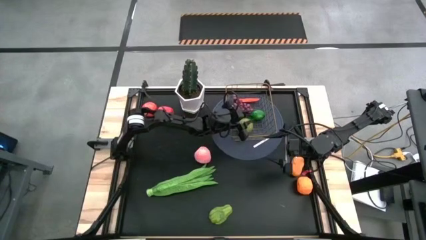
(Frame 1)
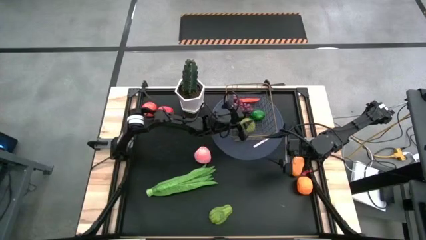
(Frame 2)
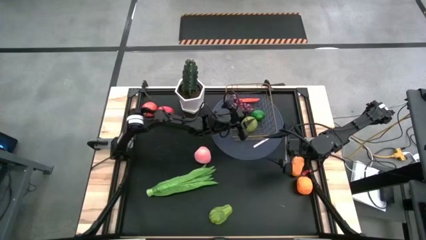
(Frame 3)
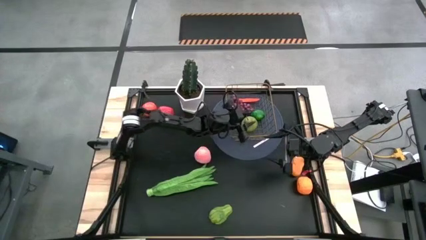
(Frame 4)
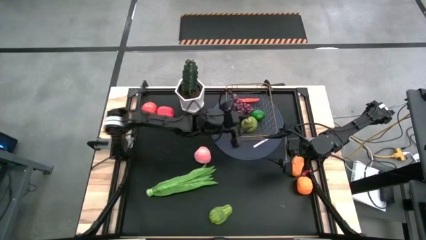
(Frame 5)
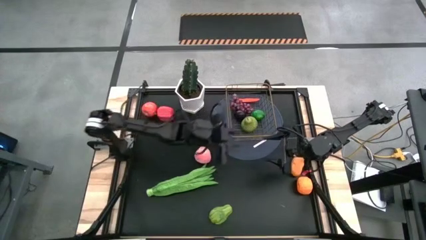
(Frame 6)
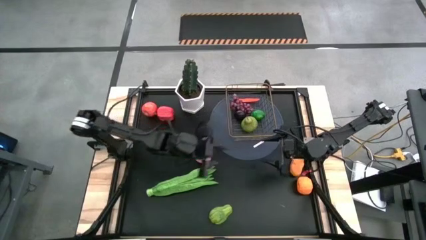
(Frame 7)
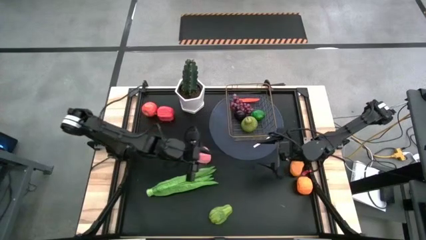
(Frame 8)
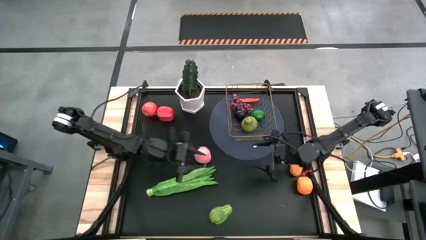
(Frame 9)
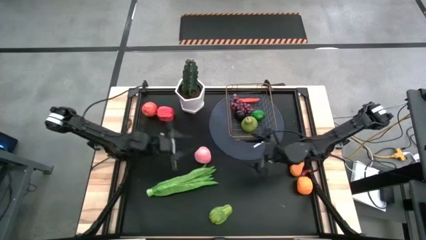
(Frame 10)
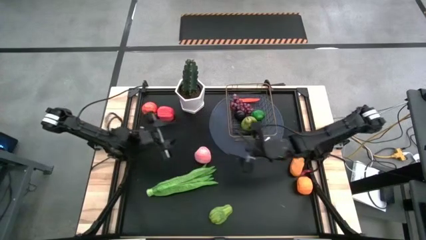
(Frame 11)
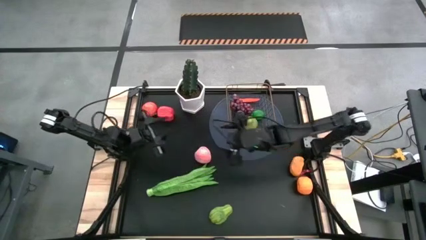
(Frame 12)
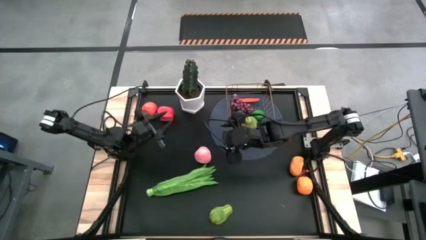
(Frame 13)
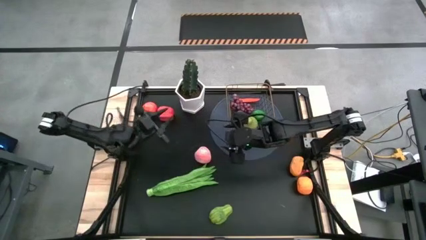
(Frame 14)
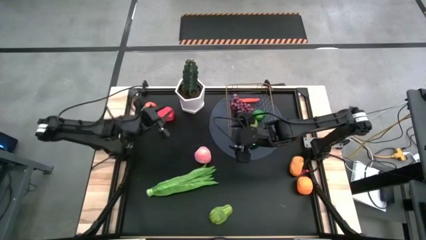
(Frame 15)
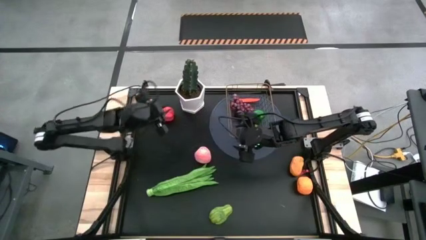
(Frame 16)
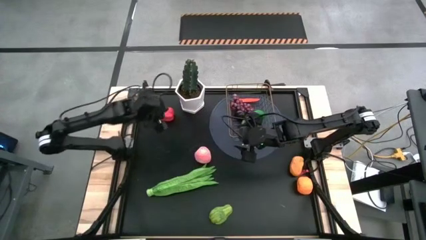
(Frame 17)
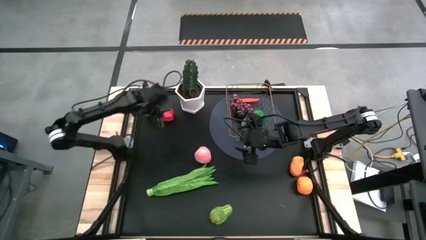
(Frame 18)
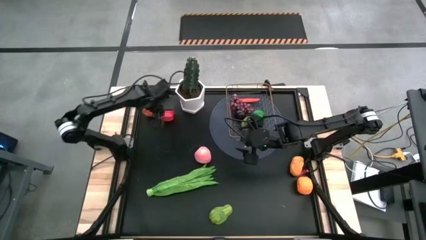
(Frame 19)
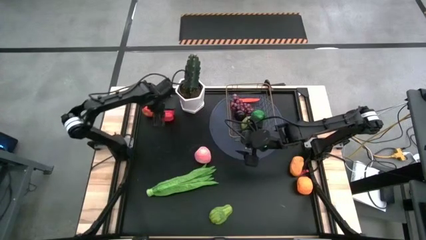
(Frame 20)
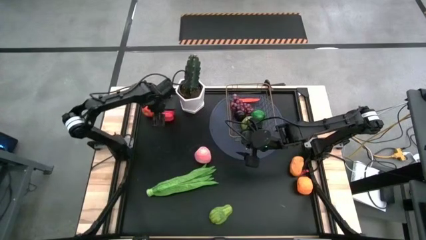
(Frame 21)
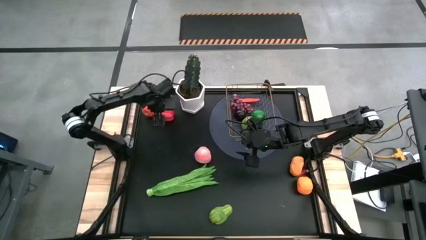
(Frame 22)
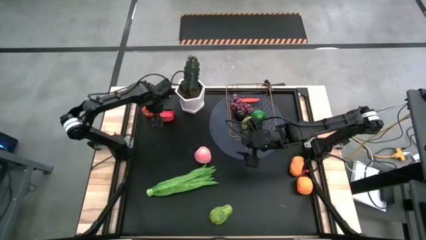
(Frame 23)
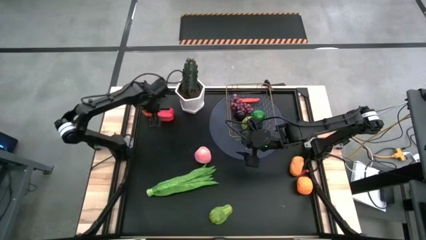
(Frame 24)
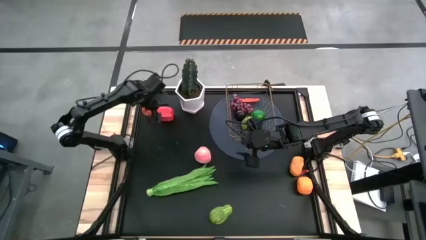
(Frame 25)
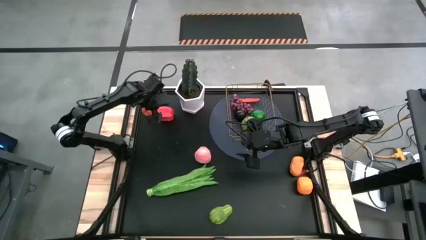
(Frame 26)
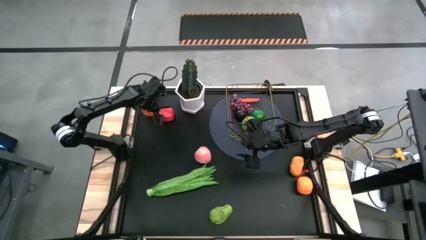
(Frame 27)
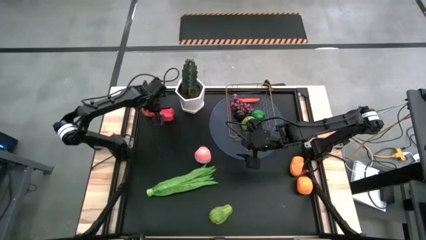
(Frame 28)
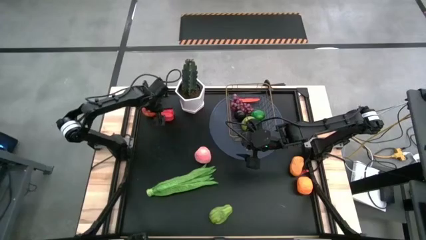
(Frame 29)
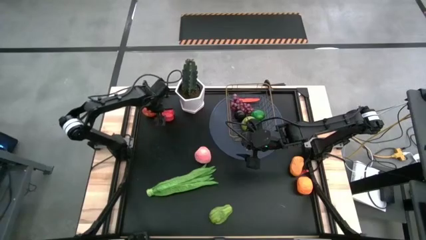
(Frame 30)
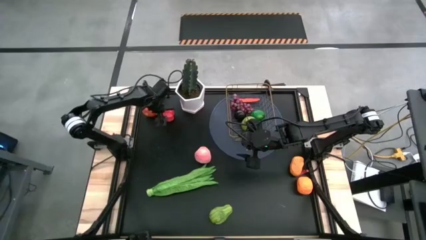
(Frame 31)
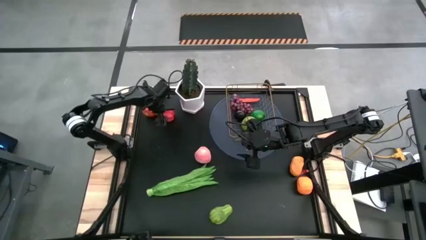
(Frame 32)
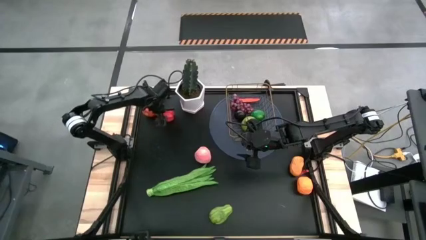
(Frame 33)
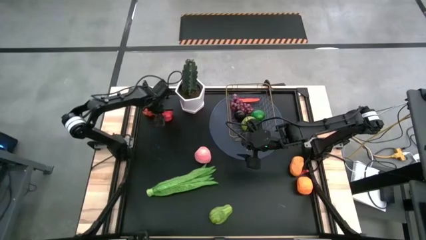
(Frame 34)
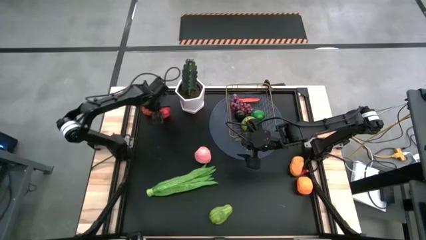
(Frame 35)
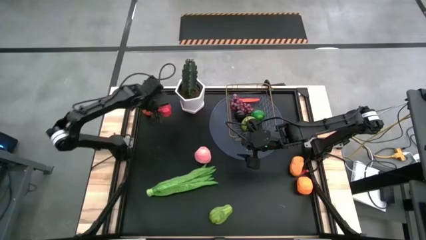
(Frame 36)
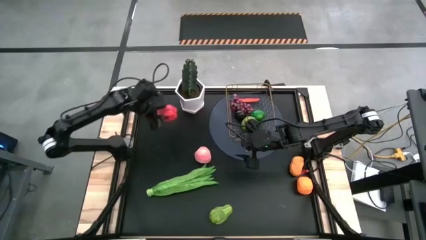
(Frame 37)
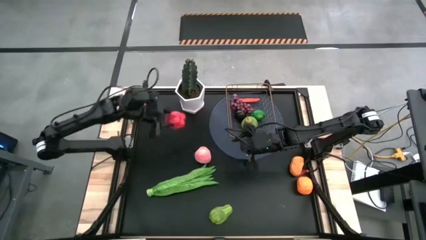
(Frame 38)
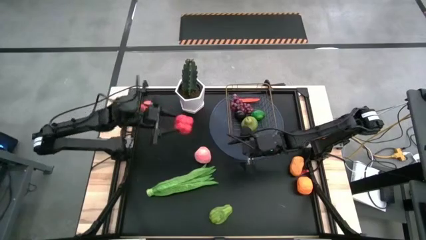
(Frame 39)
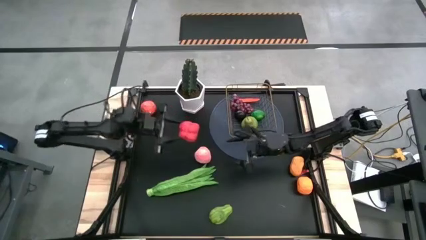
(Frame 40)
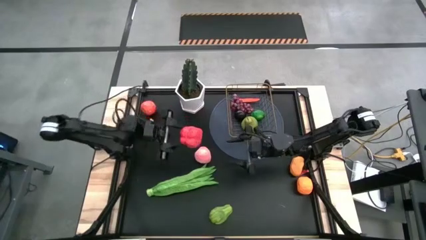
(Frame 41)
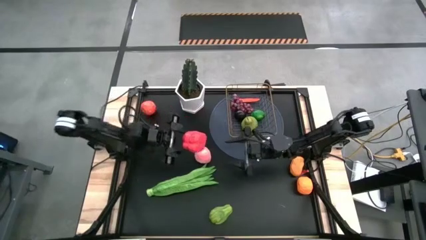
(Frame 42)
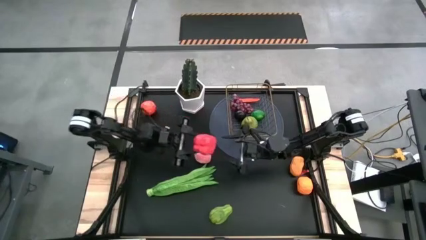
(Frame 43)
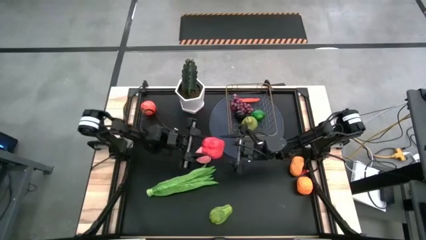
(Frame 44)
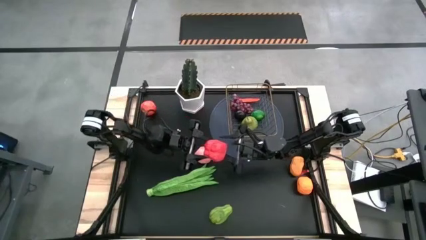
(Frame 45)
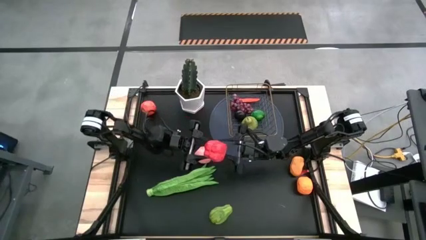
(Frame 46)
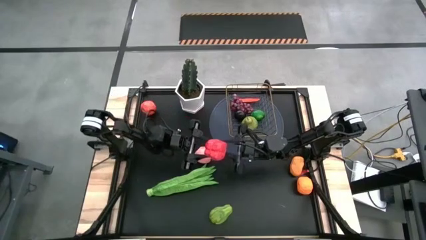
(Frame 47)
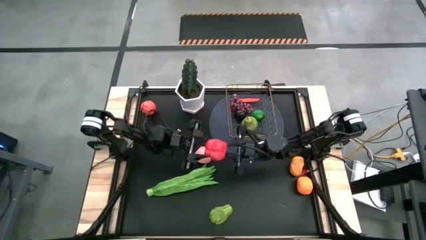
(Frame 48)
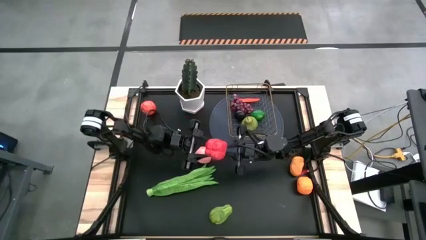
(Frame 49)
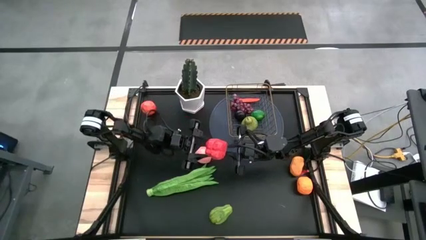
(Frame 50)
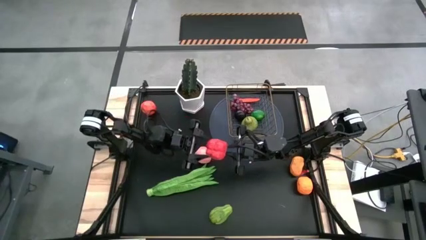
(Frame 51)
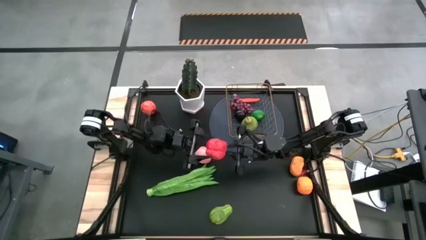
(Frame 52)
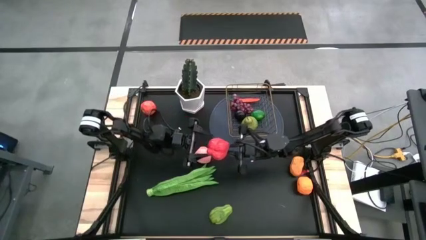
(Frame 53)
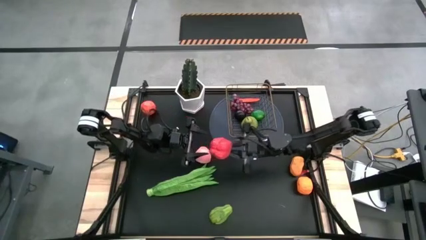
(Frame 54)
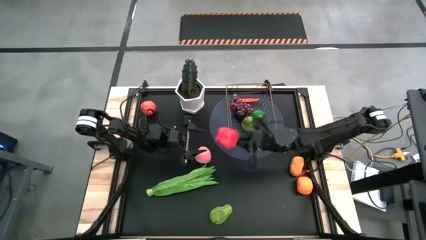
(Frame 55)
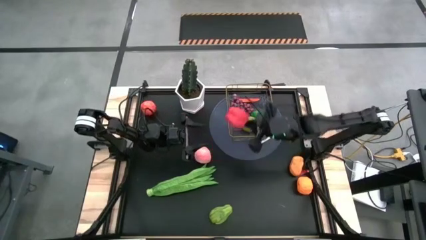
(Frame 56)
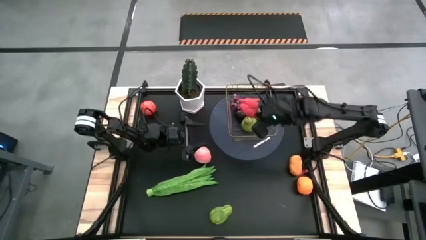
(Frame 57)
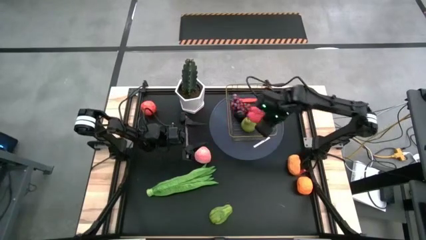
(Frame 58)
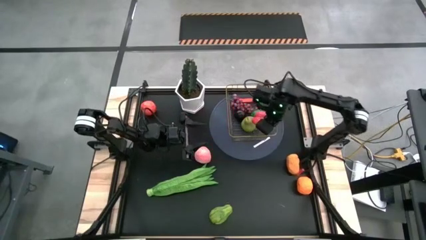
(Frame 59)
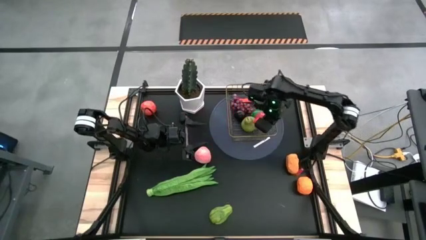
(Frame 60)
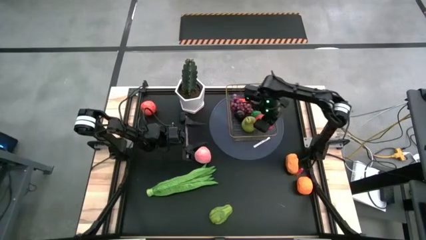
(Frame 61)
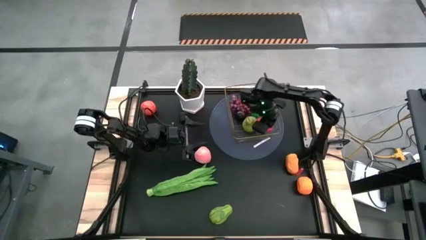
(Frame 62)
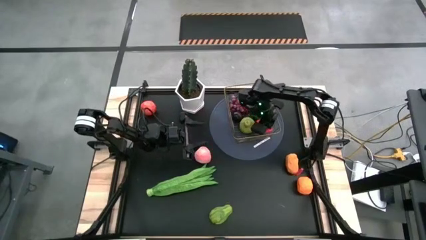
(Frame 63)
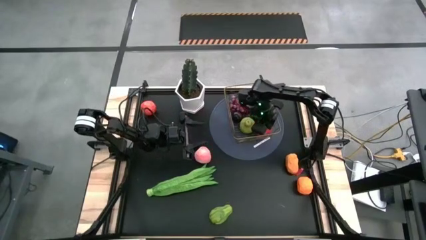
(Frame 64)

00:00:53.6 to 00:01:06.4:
Task: Build produce basket
Put the red bell pepper into the gold wire basket

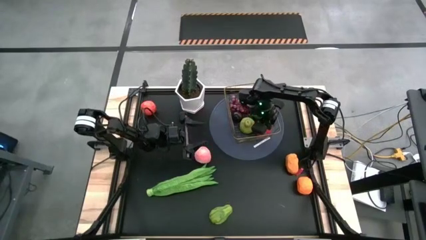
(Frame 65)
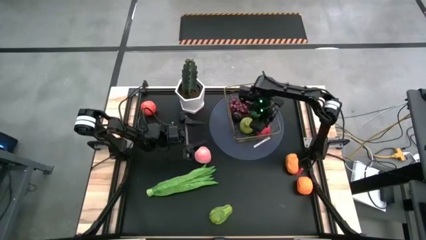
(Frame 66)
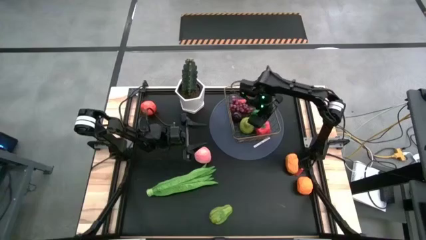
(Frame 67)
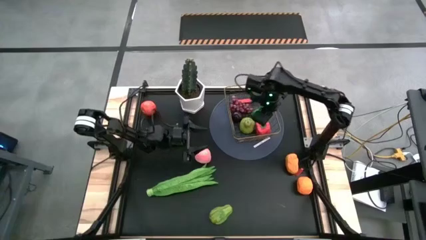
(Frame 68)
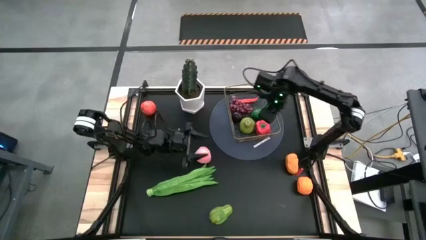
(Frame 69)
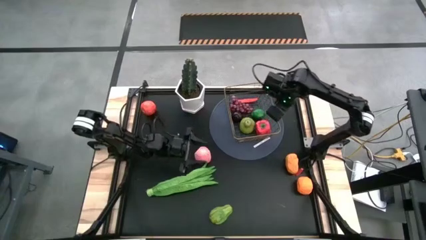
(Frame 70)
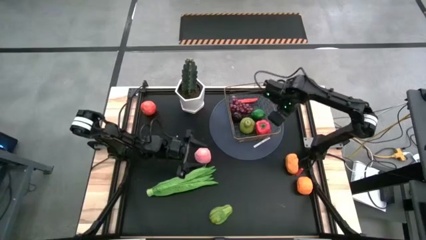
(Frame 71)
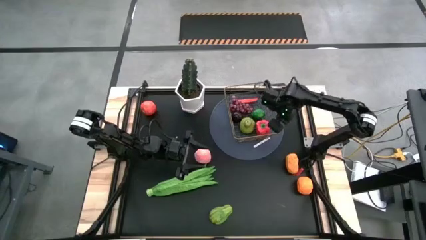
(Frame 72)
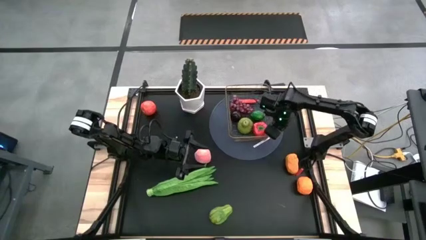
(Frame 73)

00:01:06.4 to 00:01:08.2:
Adjust the gold wire basket

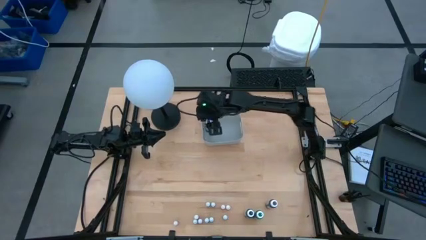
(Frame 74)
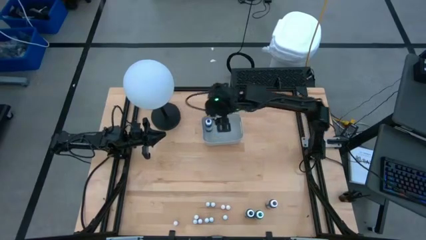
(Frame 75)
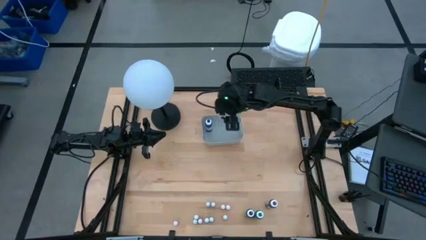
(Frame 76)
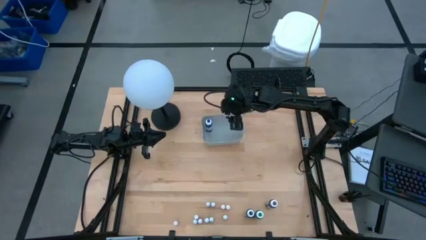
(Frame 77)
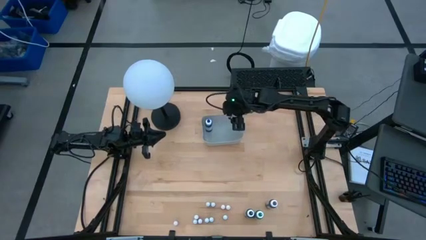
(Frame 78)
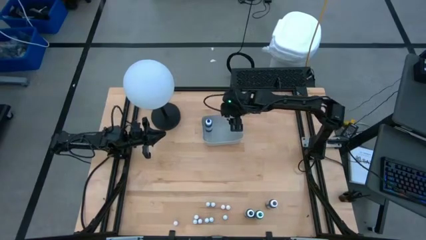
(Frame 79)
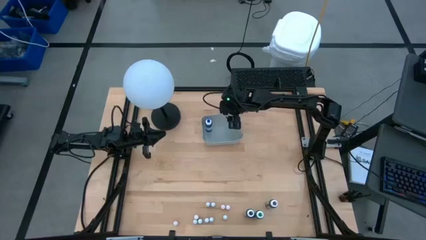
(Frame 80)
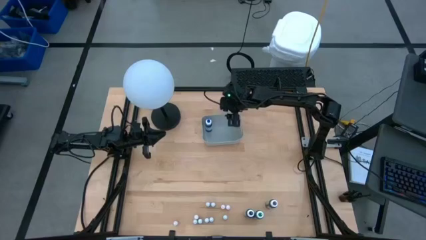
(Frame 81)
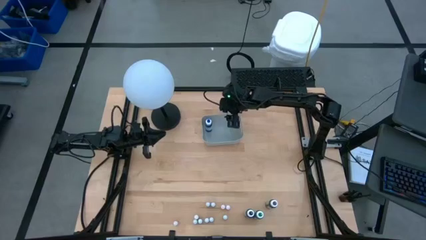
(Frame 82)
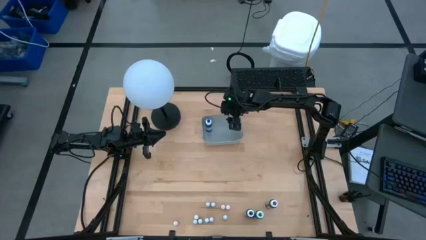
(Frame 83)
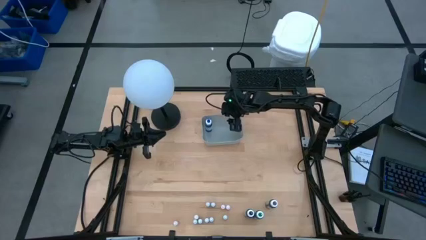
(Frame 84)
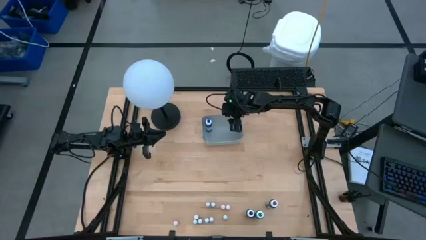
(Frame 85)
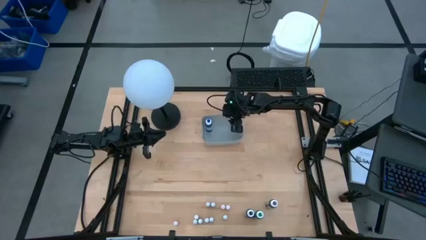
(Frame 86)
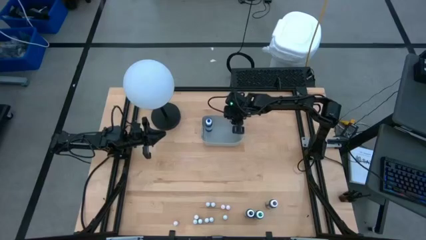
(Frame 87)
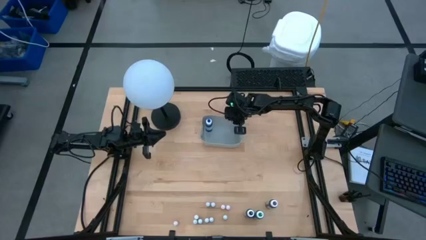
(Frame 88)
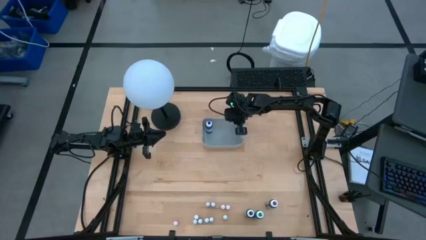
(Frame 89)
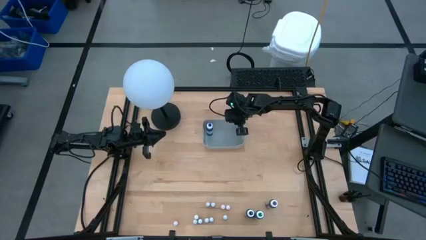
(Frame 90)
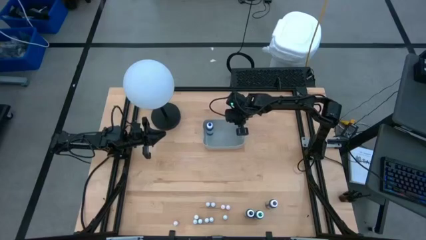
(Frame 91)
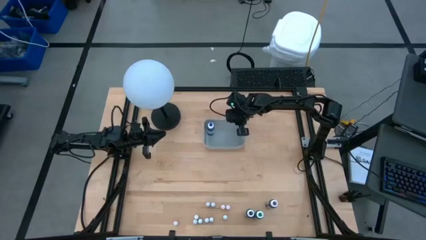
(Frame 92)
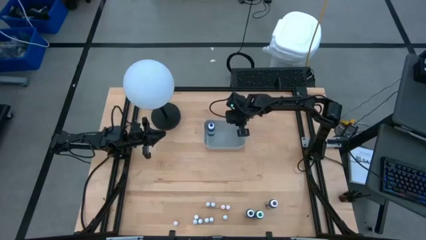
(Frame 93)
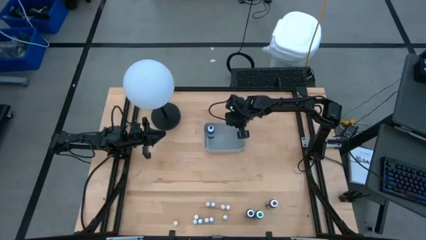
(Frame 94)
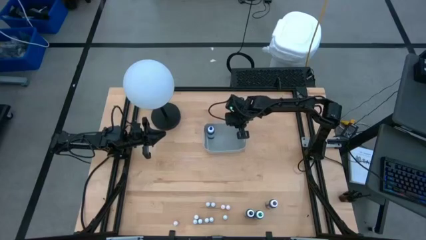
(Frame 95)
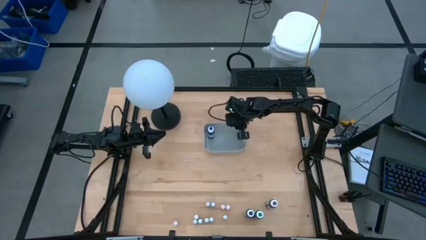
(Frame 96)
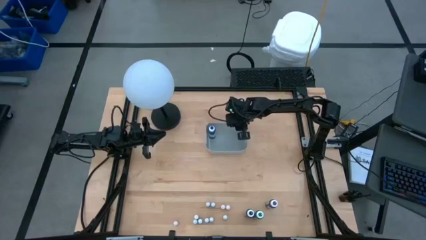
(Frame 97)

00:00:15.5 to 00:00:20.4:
Task: Pick & Place food coloring
Adjust the gray bin
